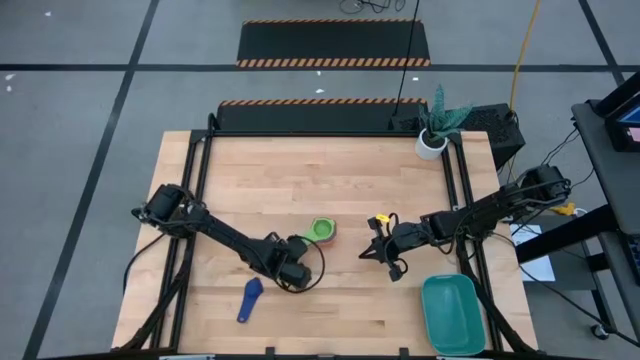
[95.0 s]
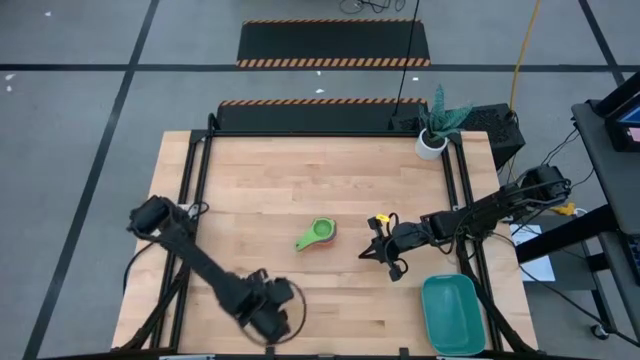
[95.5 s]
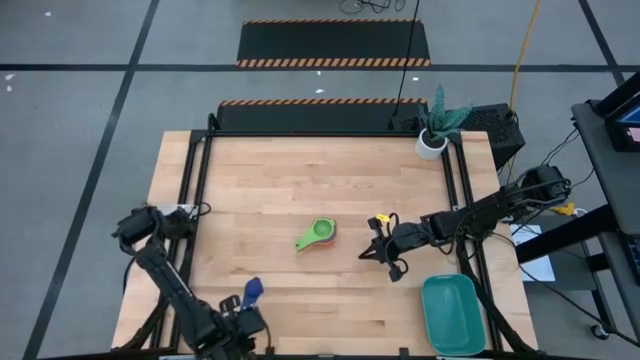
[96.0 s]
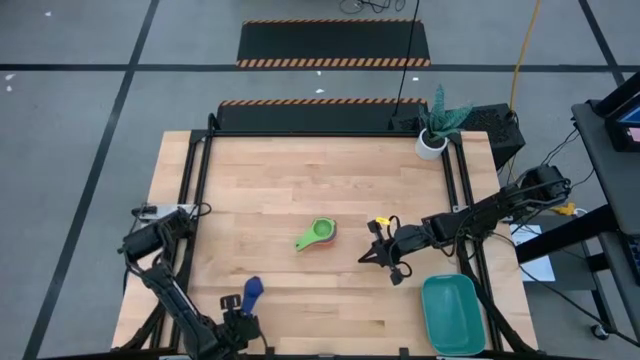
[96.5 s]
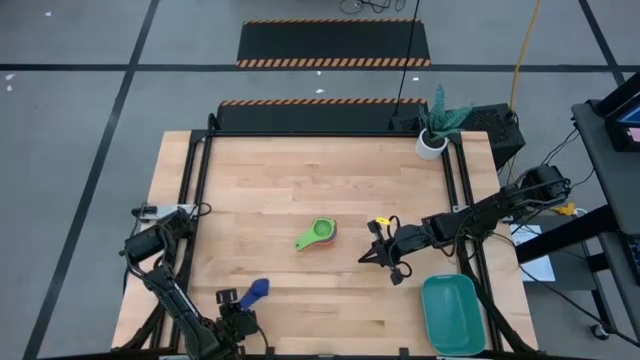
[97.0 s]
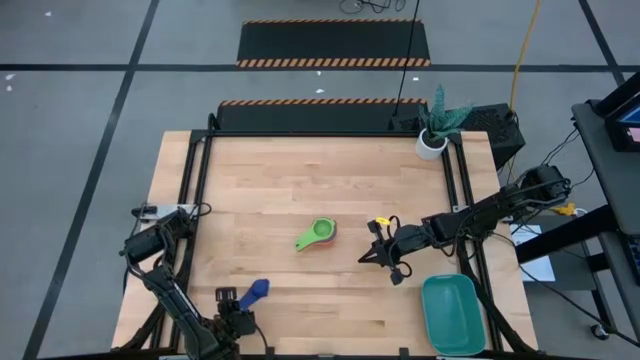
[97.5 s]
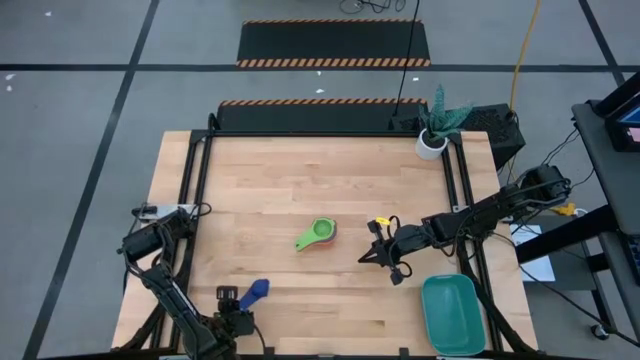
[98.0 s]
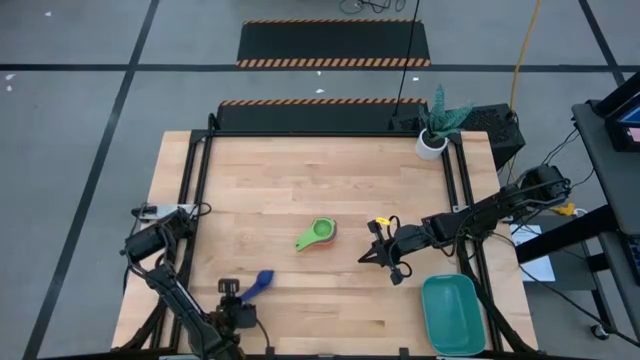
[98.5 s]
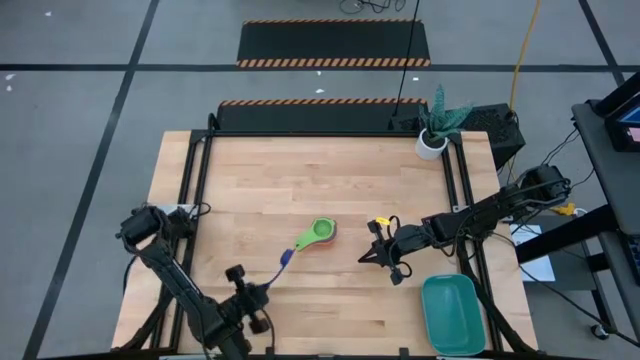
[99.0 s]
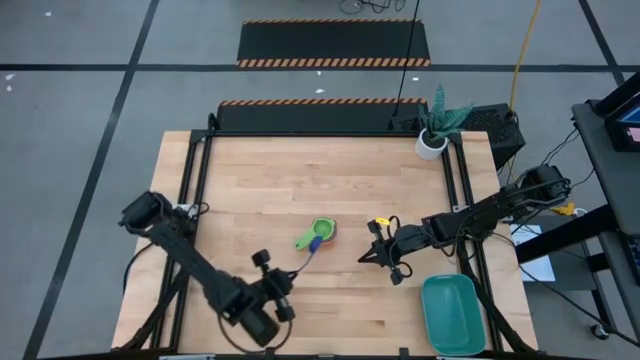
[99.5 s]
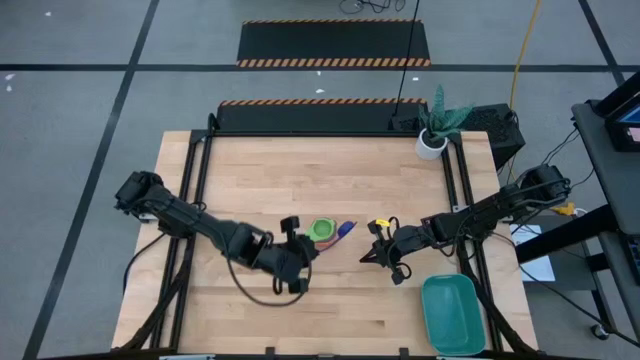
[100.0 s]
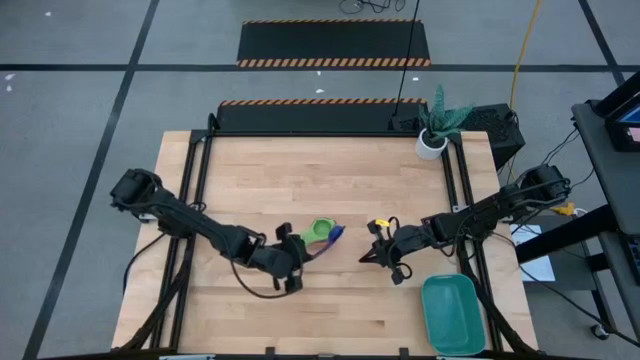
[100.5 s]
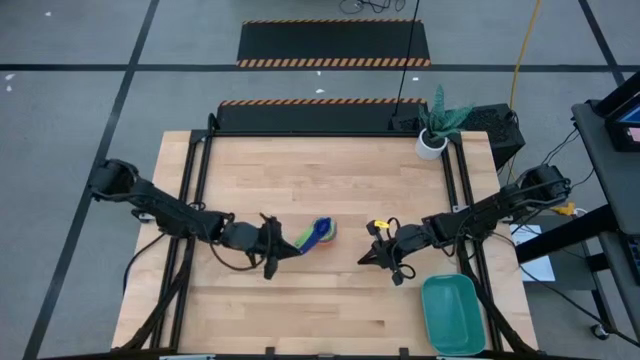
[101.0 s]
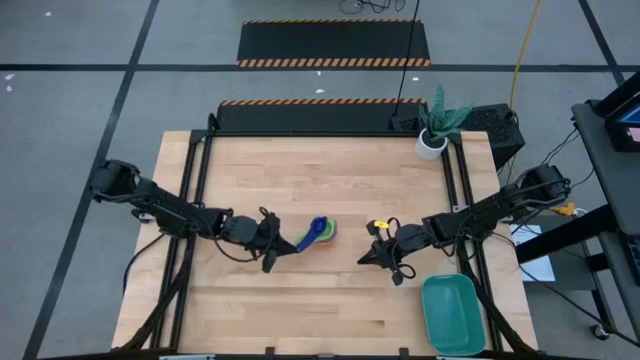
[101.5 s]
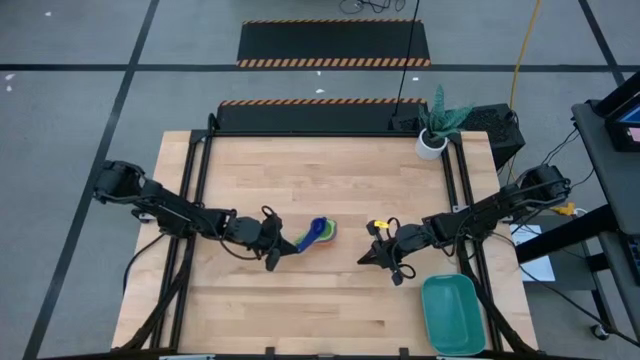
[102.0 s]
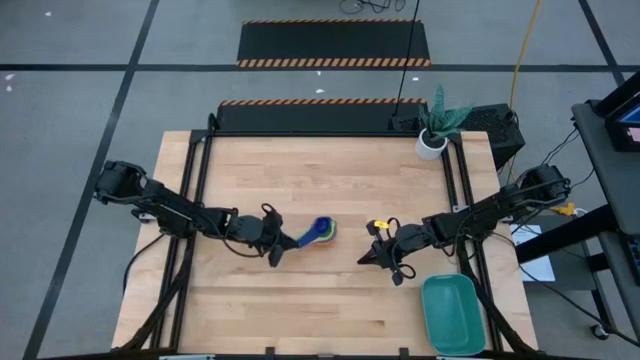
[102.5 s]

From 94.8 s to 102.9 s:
Task: Nest measuring cups in basket
Stack the dark blue measuring cup on top of the green measuring cup

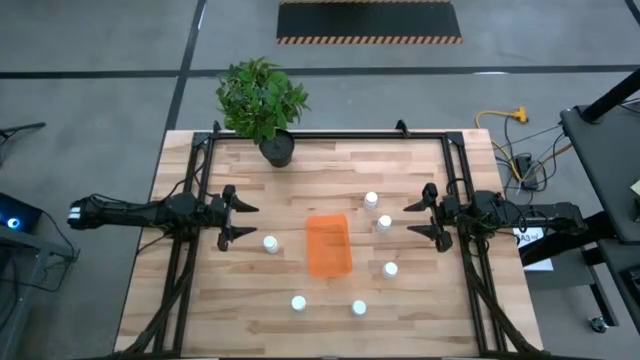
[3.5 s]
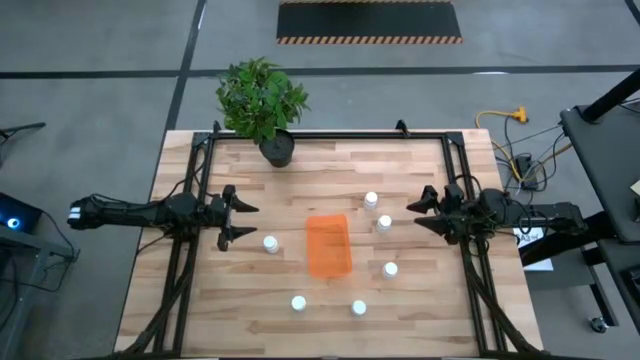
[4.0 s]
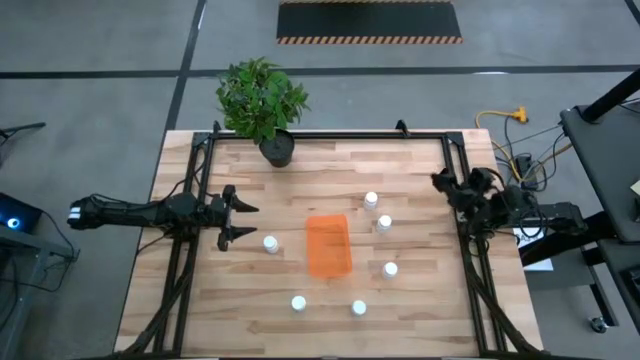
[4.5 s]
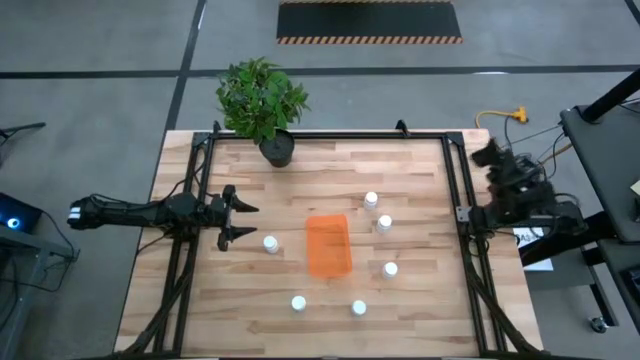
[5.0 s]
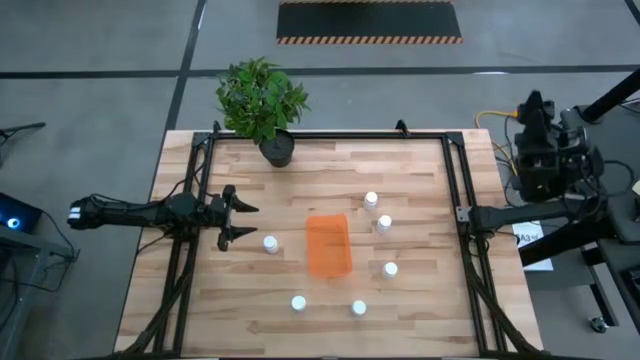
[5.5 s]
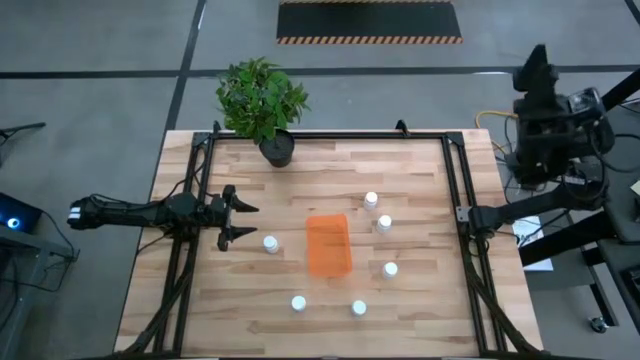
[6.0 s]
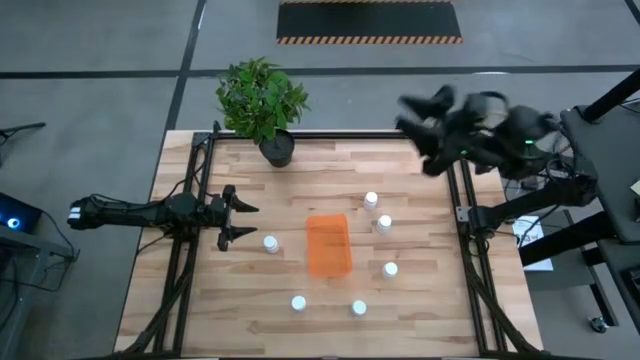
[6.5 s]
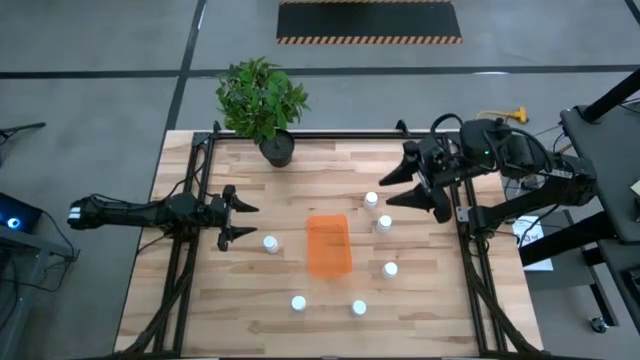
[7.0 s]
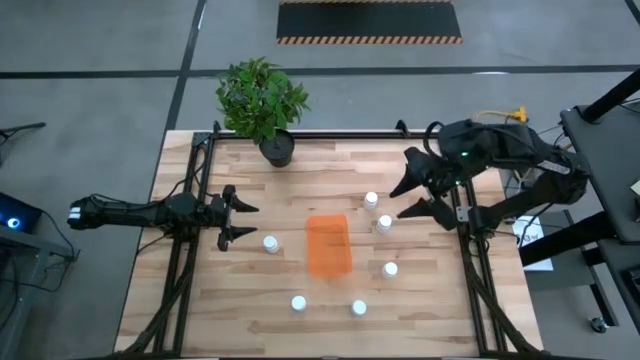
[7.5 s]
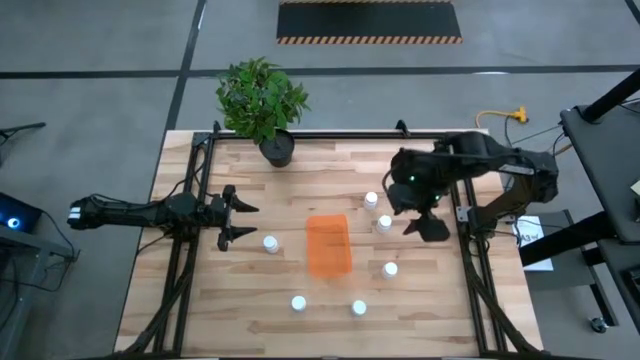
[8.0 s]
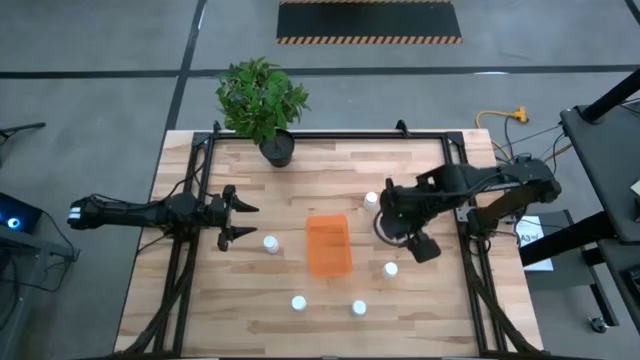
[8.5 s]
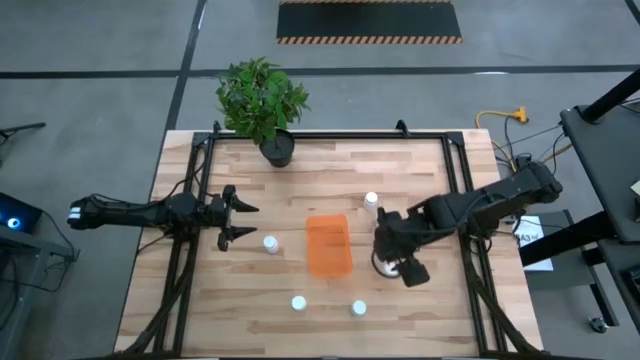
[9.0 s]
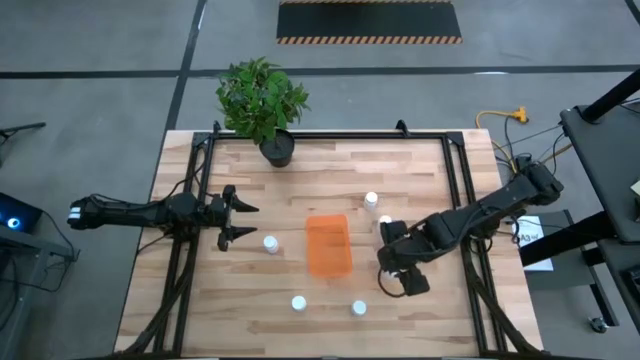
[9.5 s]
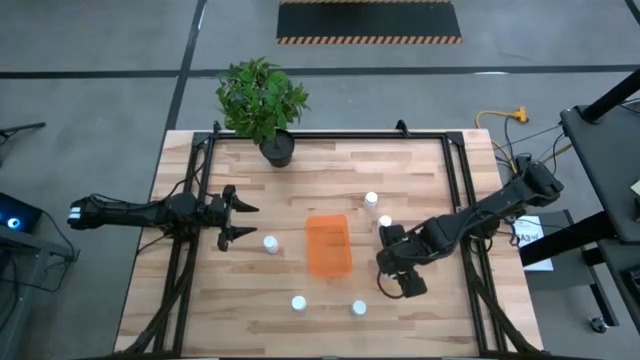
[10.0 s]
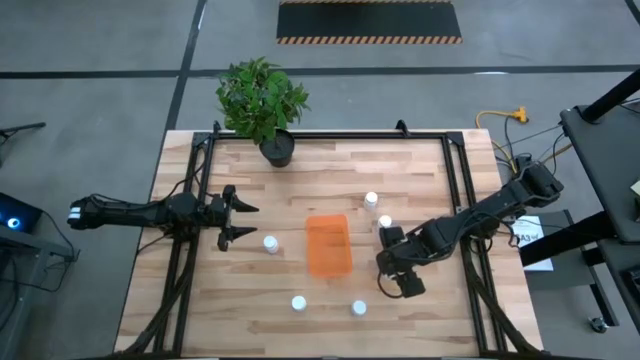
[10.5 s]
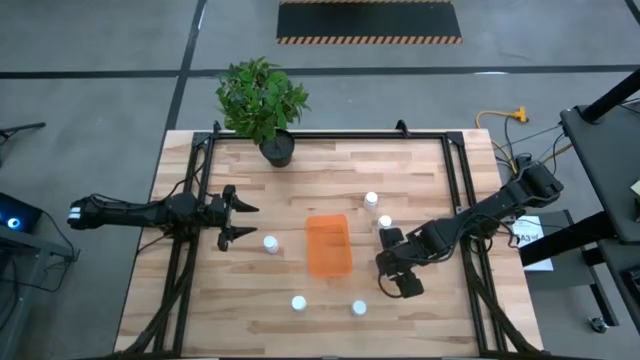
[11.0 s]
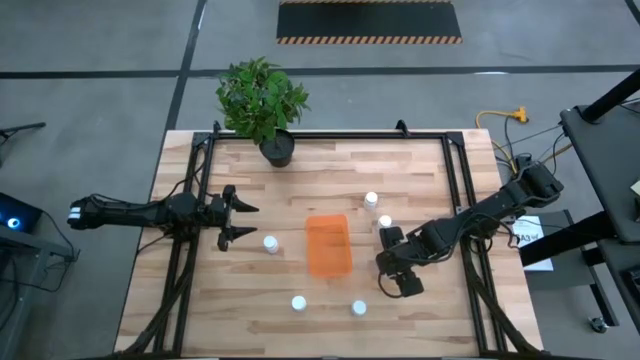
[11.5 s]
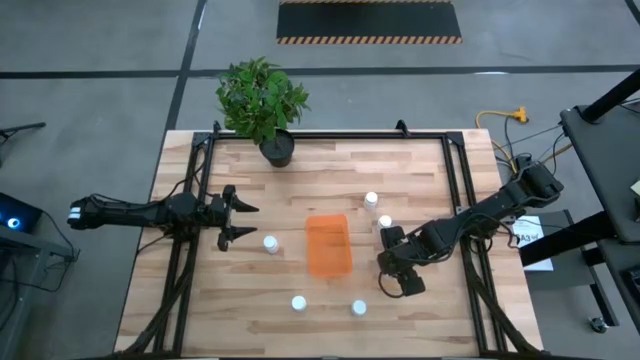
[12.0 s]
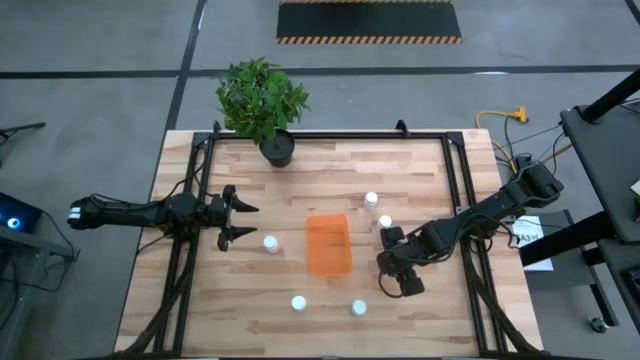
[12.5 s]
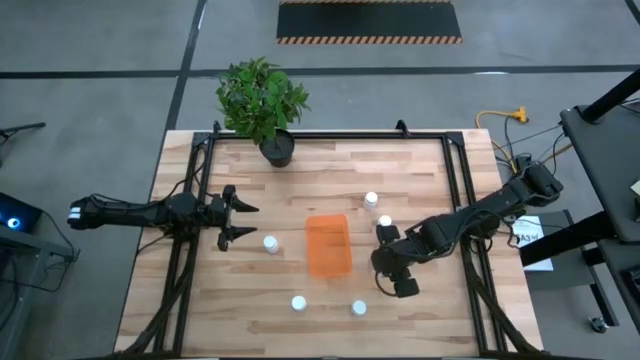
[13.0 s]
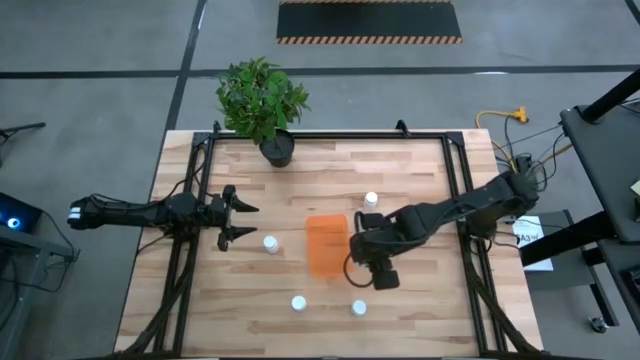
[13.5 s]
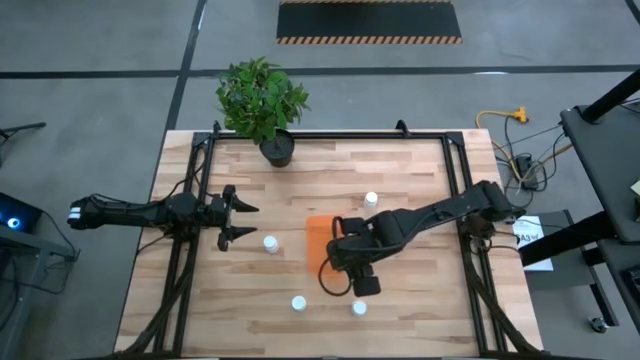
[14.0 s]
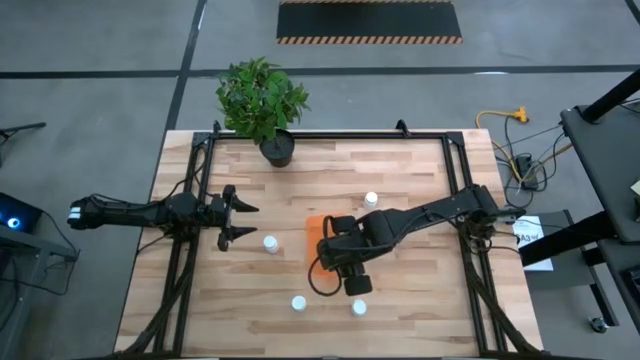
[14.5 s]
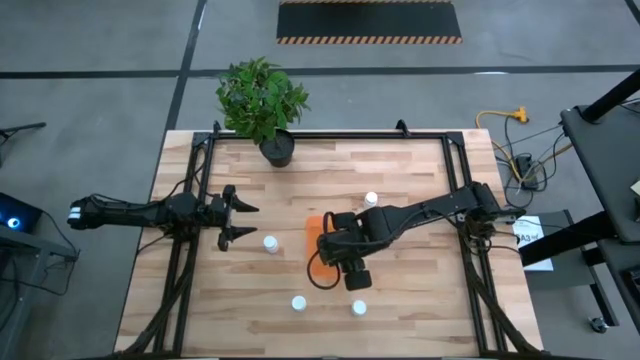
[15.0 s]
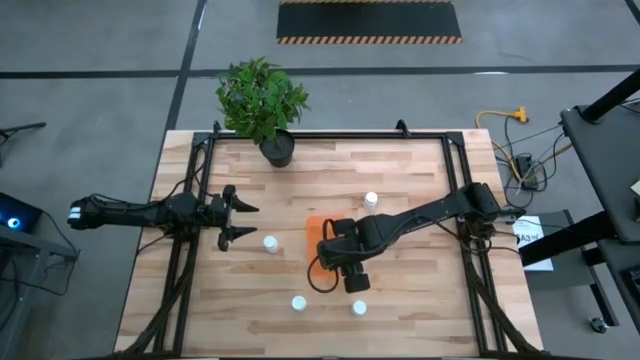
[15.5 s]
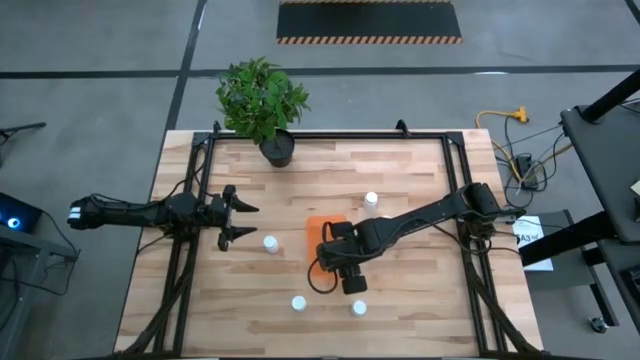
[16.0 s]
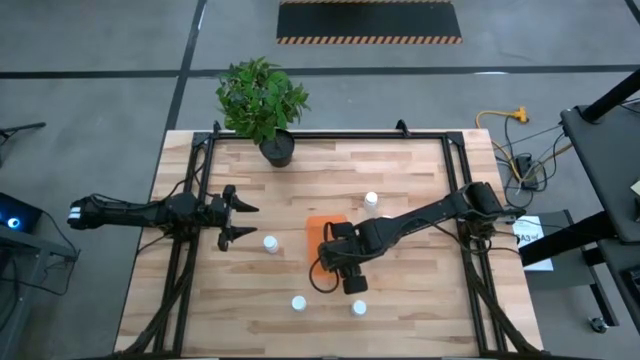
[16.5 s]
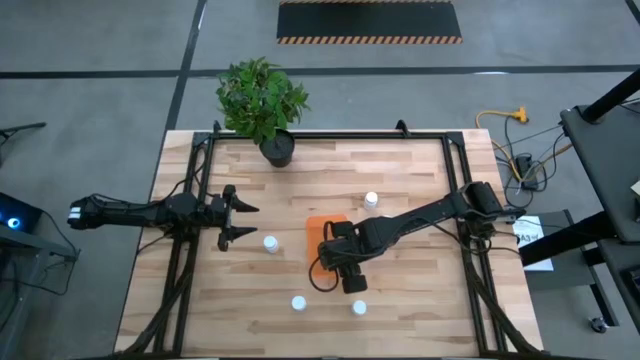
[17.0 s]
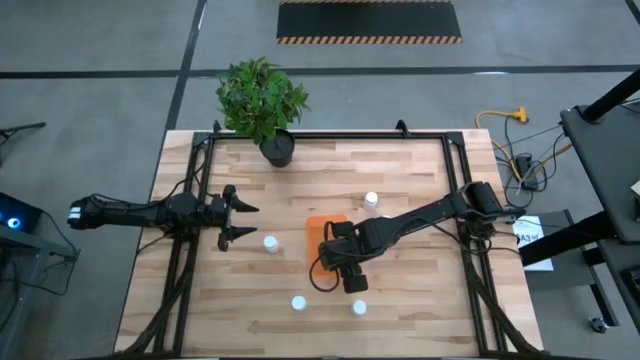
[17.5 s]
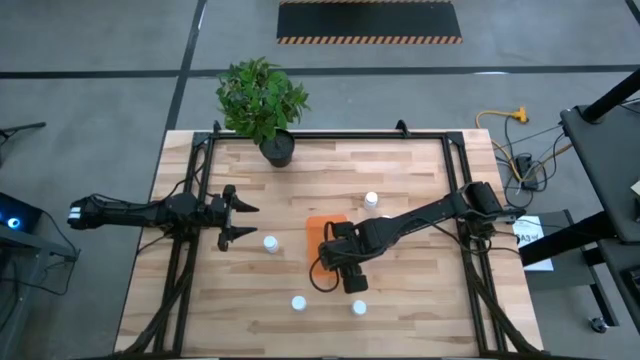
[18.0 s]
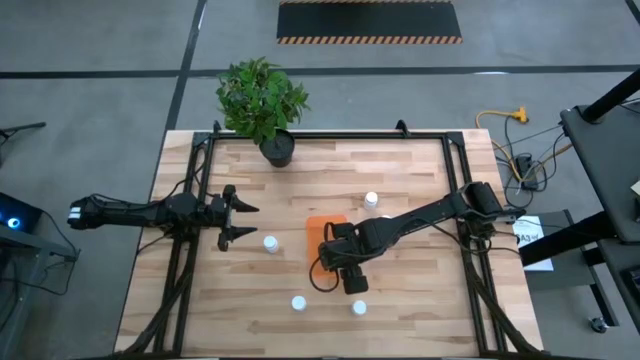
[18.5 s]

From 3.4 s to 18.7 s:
Task: Pick and place pill bottles into a basket
Put the white pill bottle into the orange container
